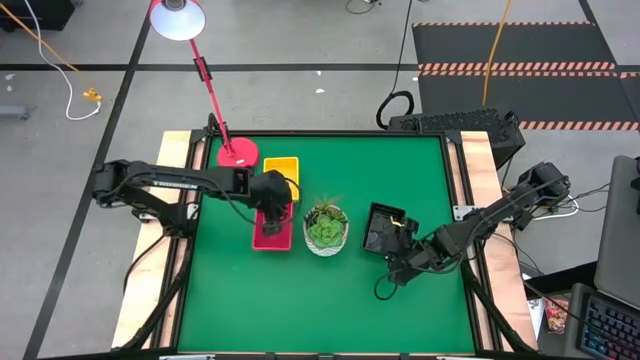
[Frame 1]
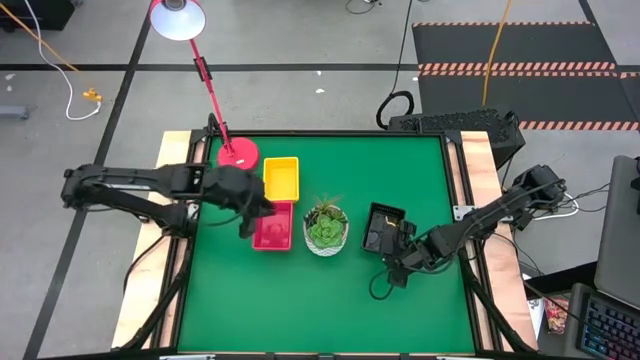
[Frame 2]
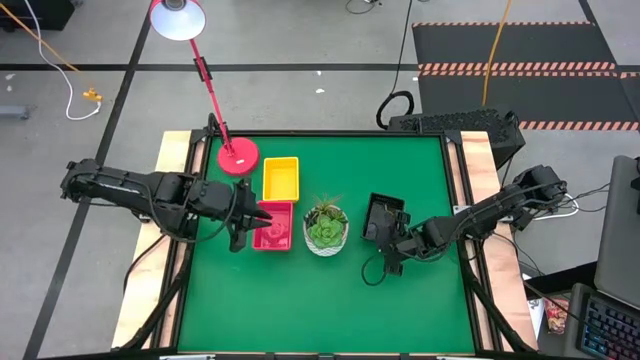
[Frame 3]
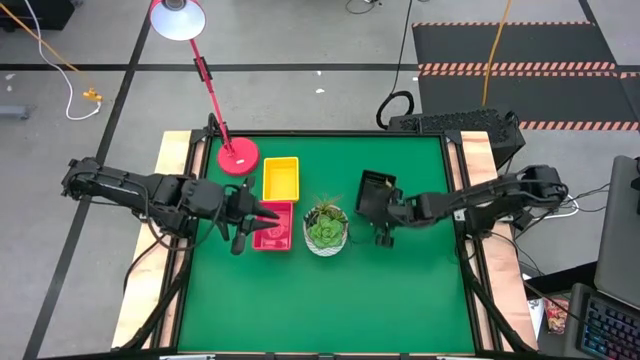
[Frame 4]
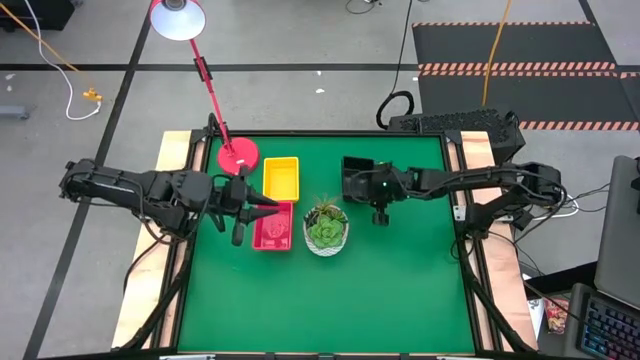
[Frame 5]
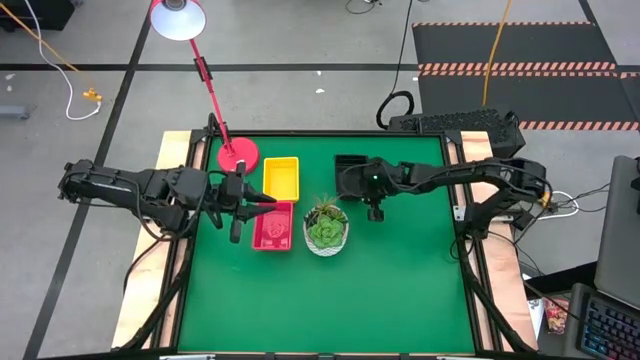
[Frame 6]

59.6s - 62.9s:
Move the stacked black bins to the top right of the table

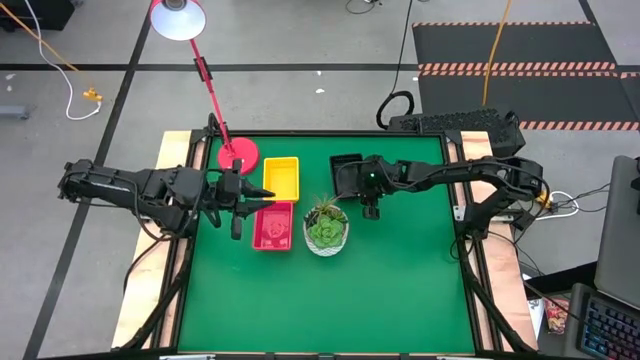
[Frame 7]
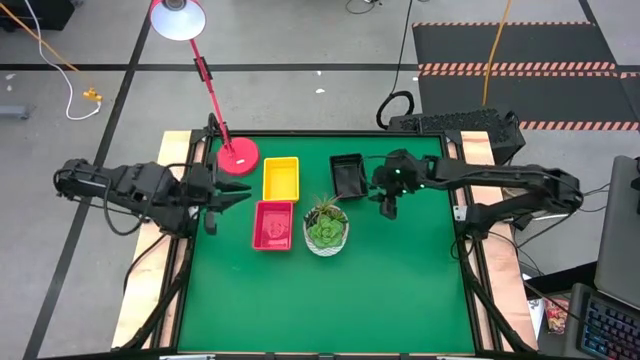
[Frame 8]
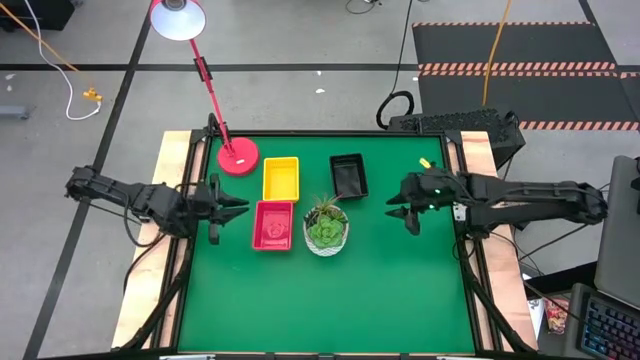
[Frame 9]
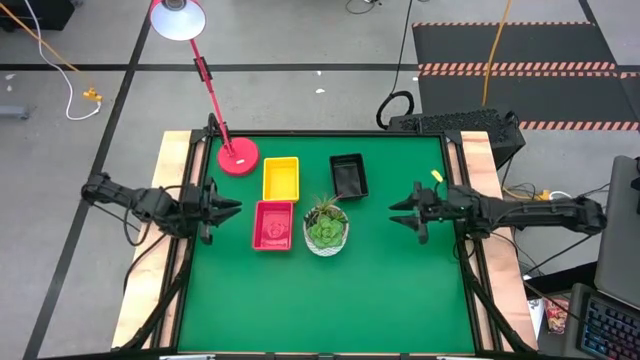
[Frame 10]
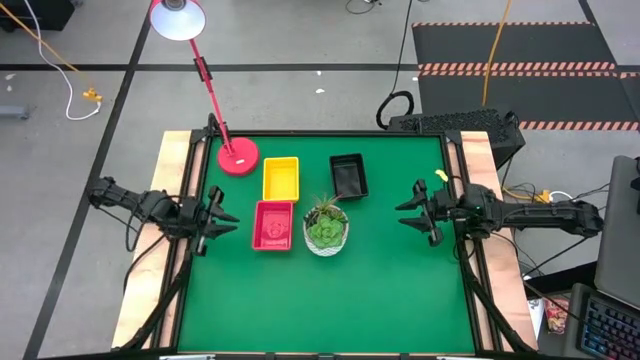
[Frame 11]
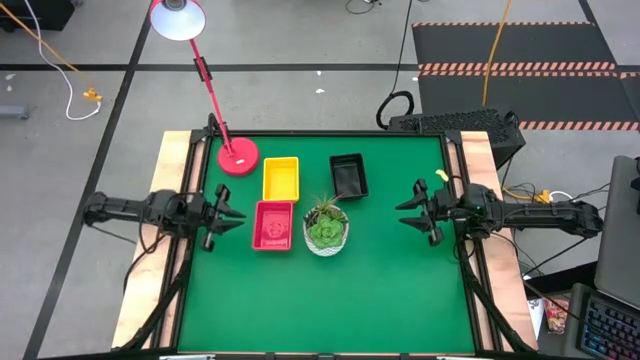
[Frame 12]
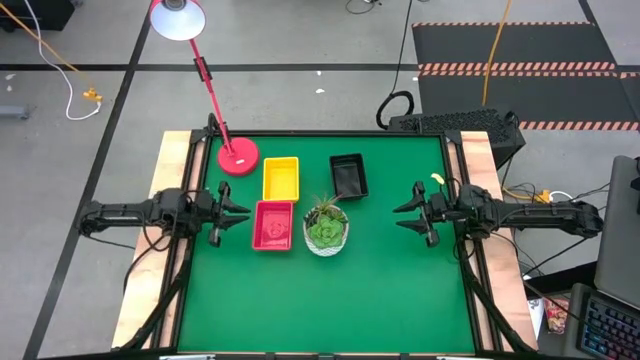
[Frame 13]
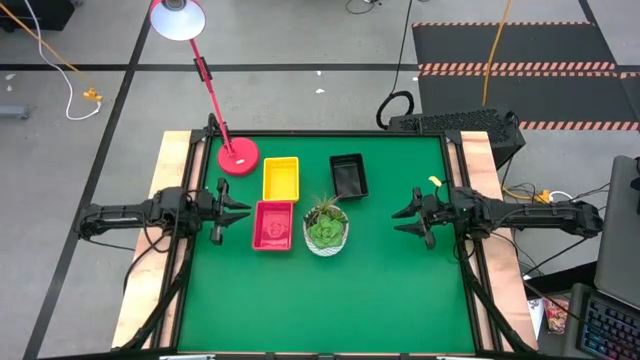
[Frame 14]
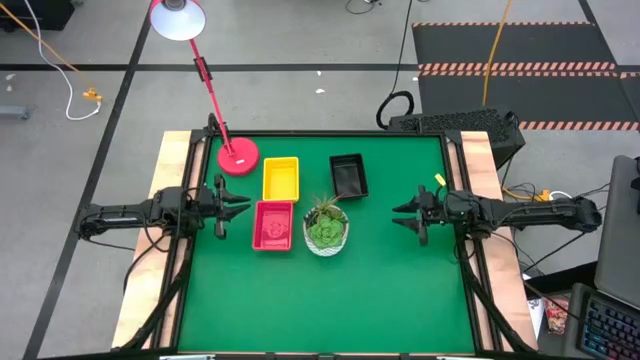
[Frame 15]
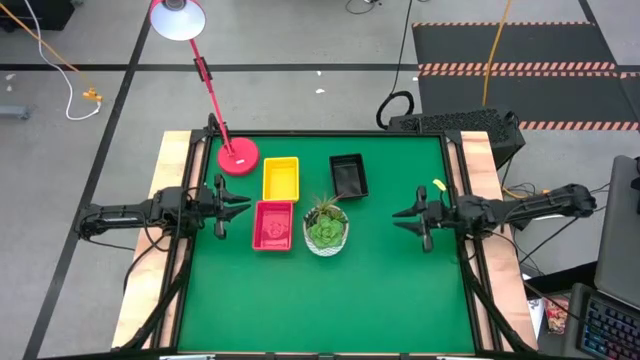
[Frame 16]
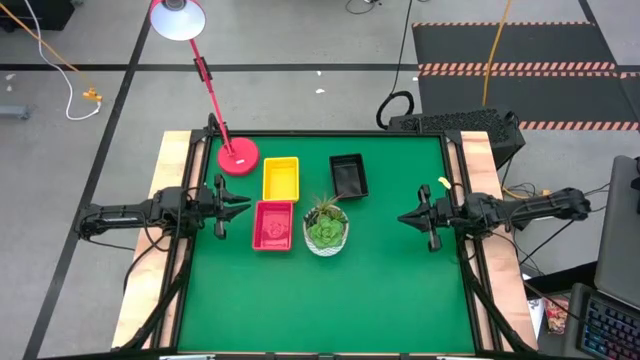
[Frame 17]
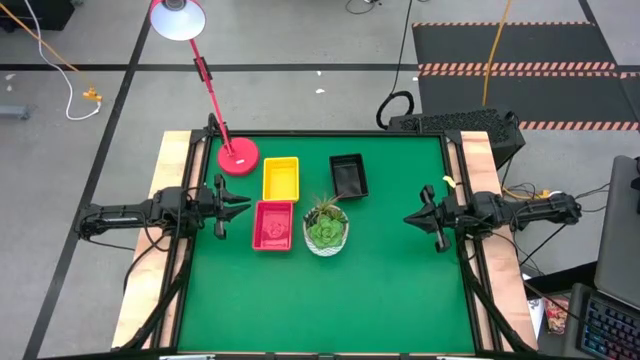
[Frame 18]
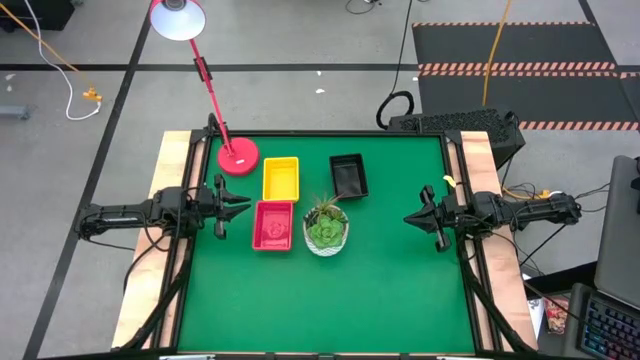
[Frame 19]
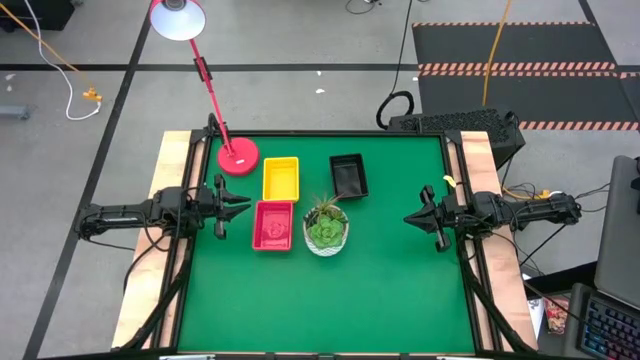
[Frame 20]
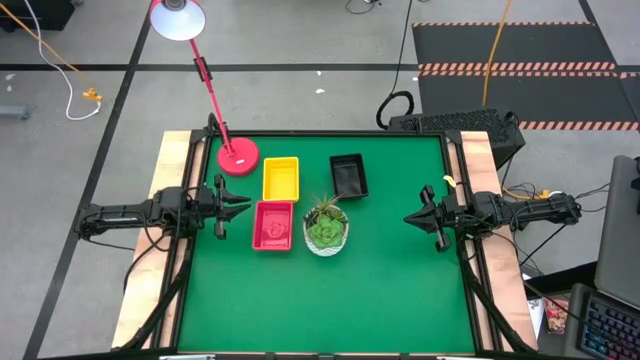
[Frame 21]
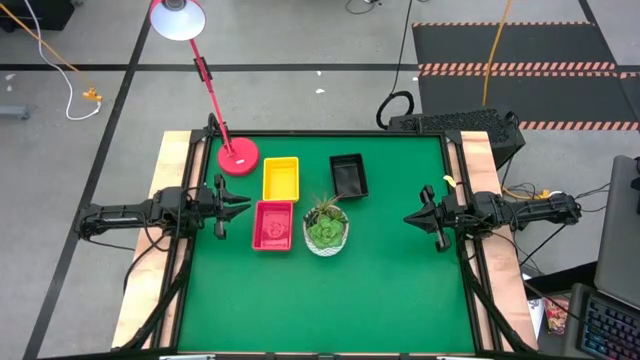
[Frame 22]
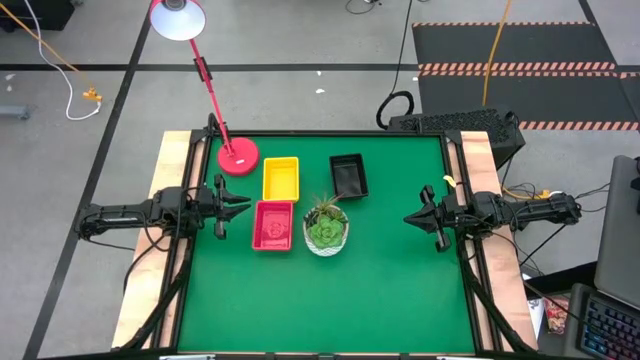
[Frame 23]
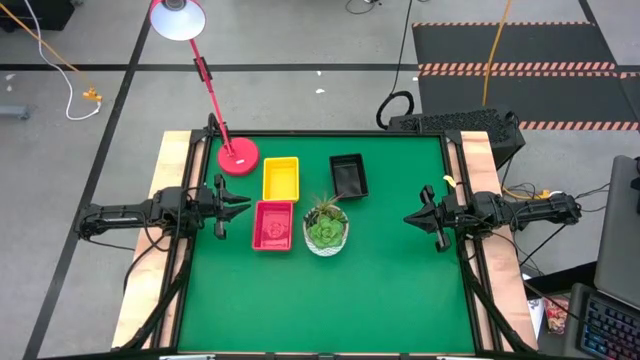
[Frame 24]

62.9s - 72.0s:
Return to Home Position
